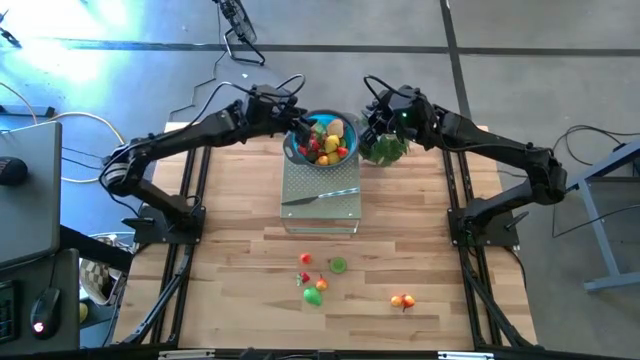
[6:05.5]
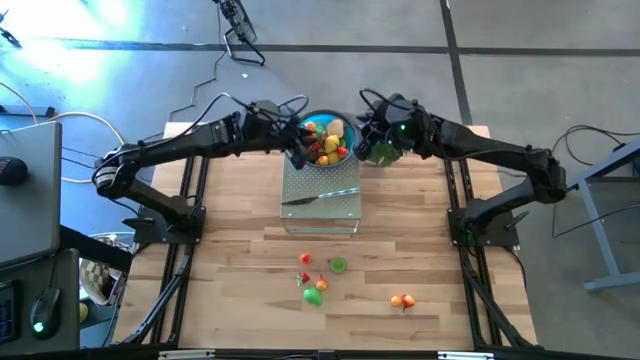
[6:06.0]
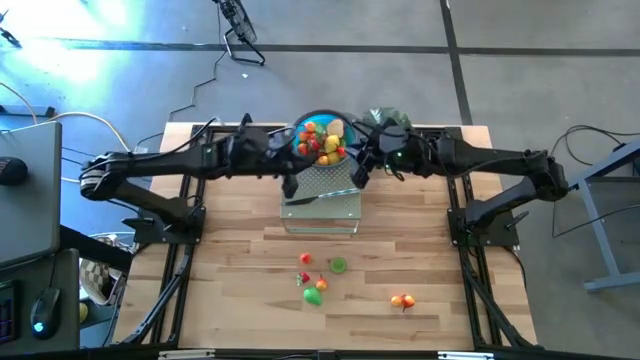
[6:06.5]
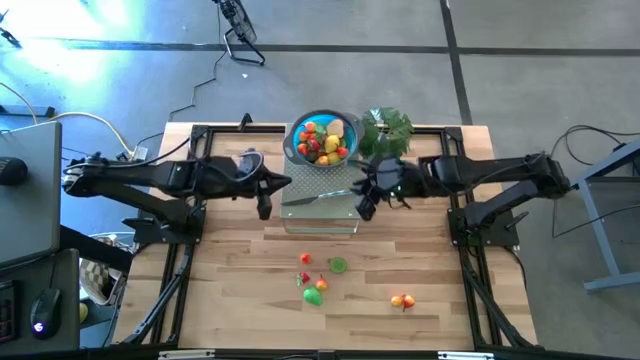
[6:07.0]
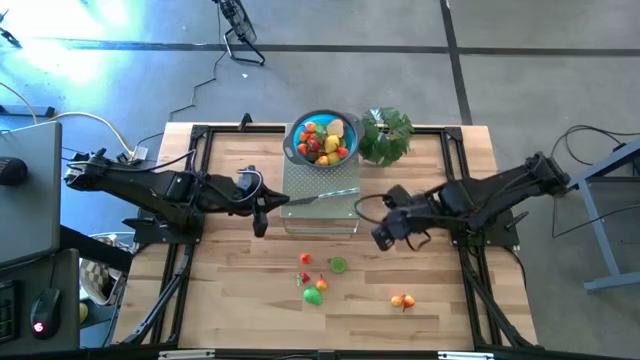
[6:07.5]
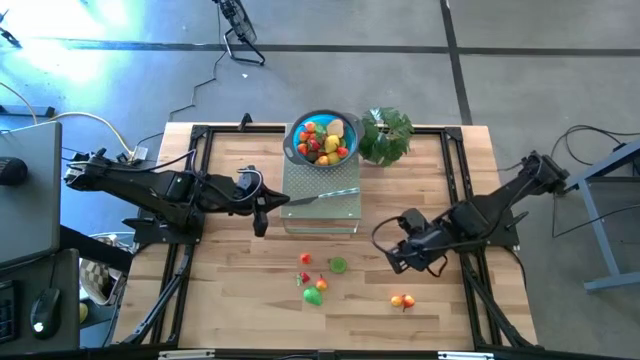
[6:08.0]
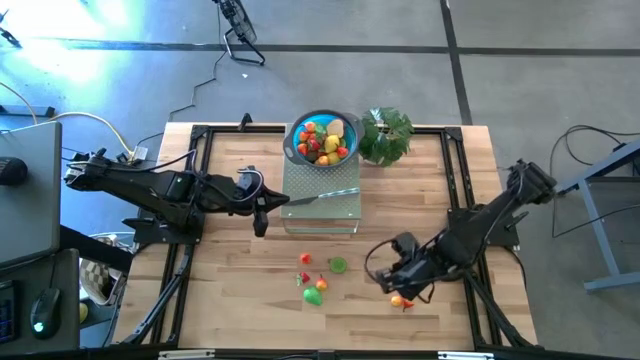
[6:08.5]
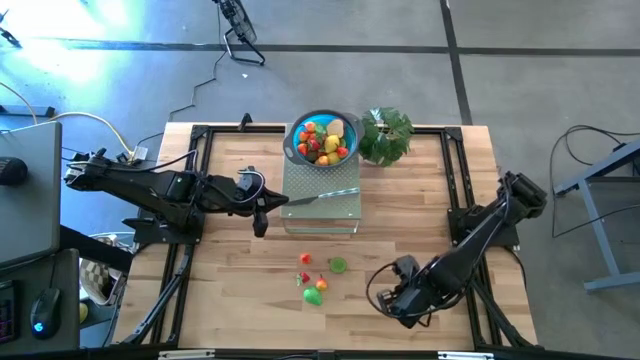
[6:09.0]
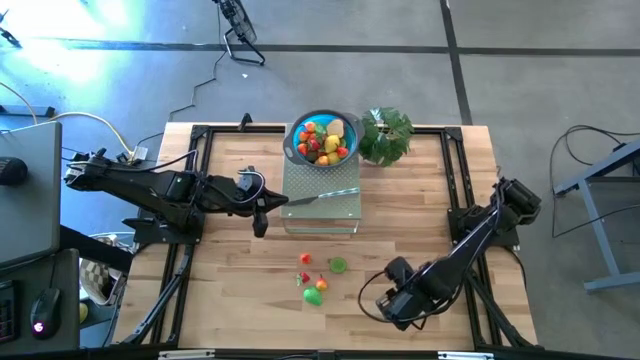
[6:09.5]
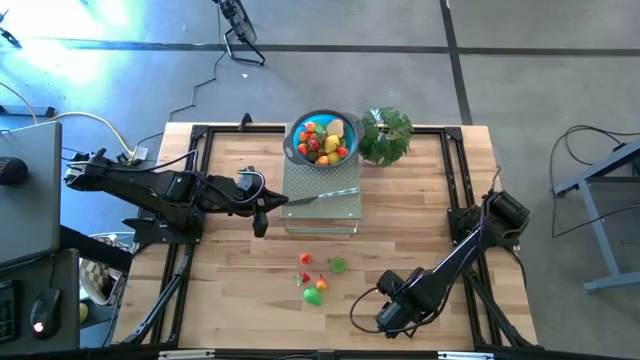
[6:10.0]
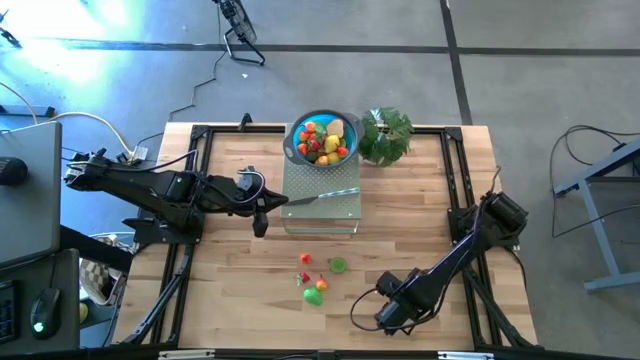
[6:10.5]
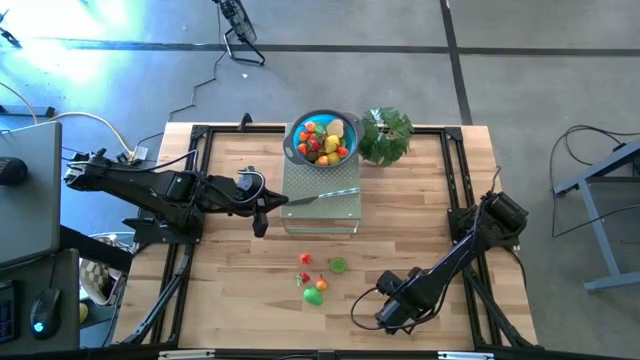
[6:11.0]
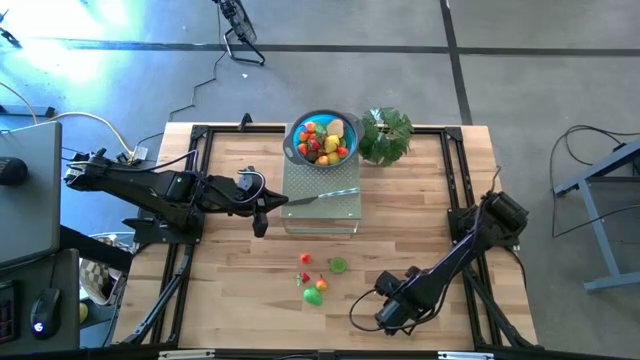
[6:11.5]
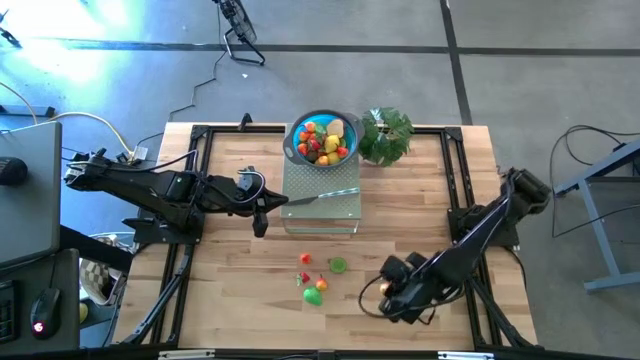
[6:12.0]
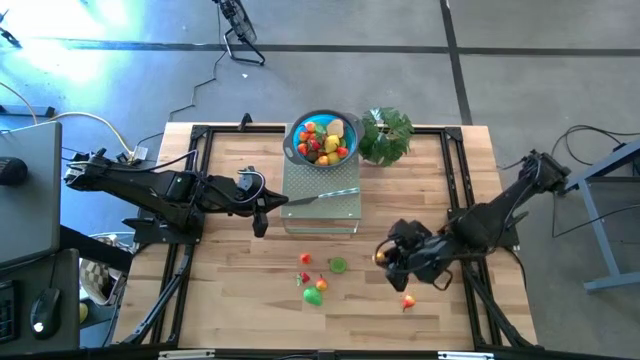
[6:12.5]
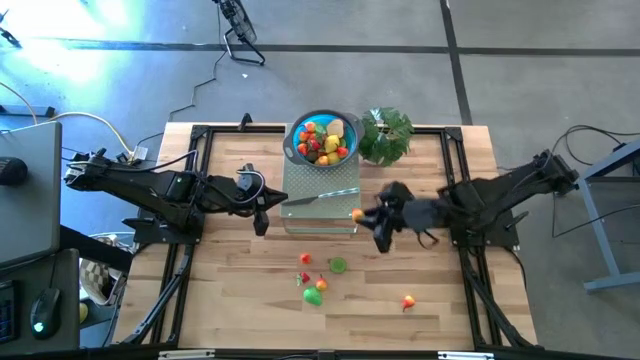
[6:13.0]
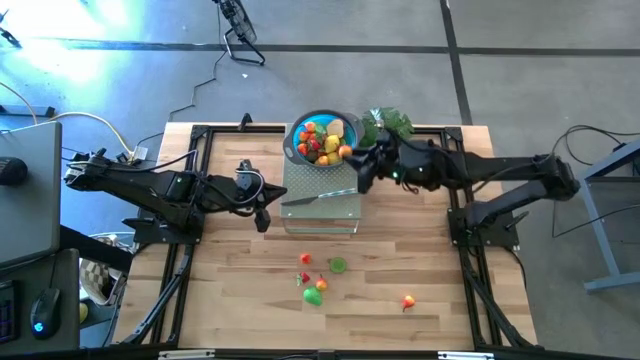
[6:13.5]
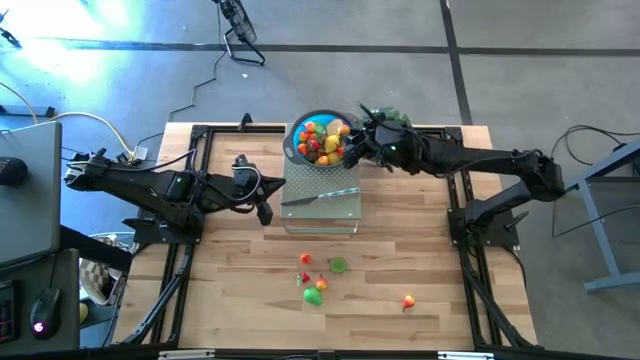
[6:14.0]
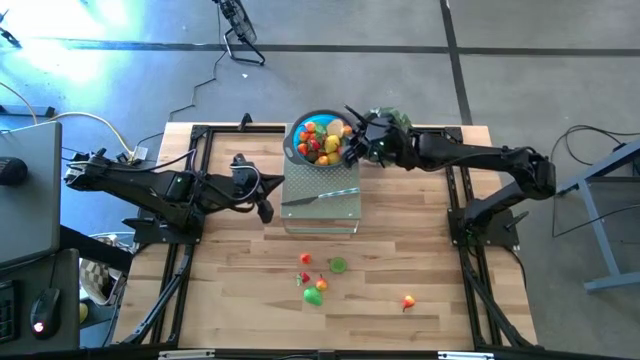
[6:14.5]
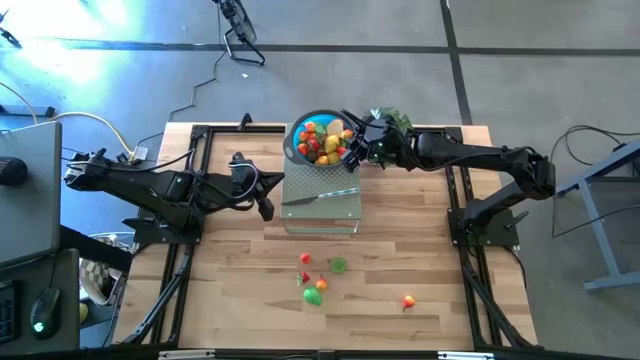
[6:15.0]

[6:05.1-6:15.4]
Task: Pick & Place Fruit
Put the orange peach in the blue bowl on the shelf

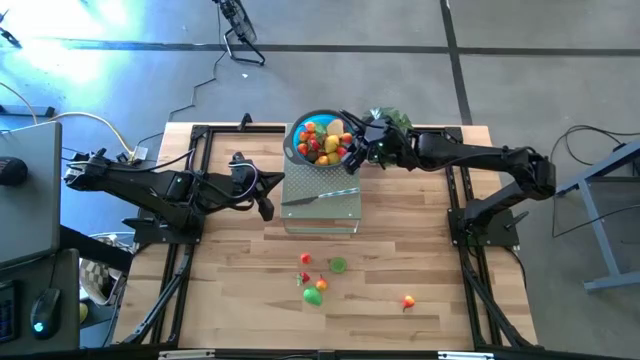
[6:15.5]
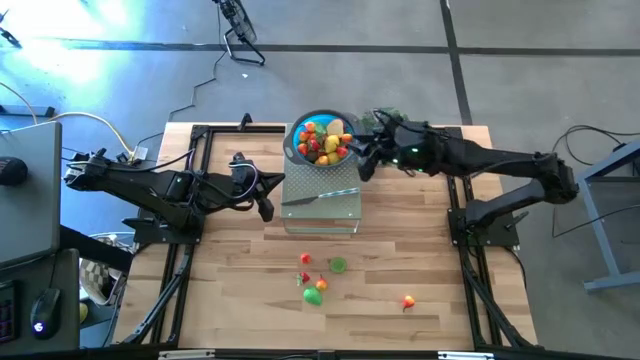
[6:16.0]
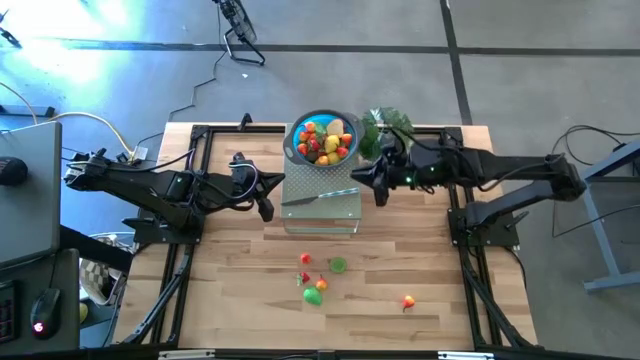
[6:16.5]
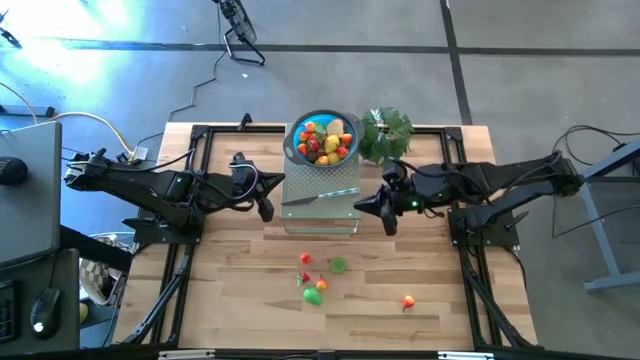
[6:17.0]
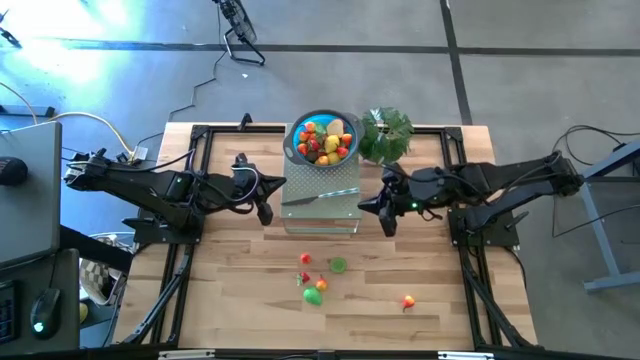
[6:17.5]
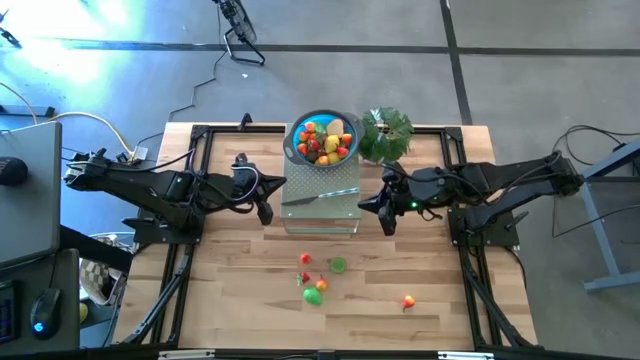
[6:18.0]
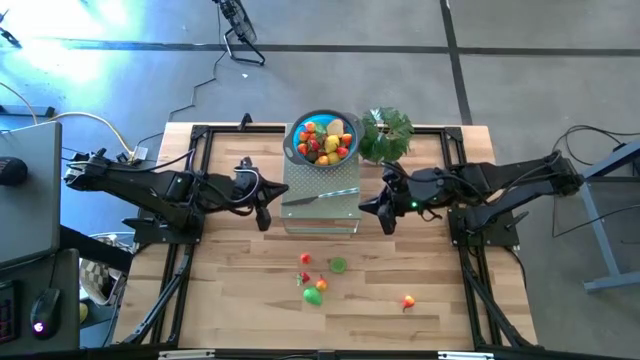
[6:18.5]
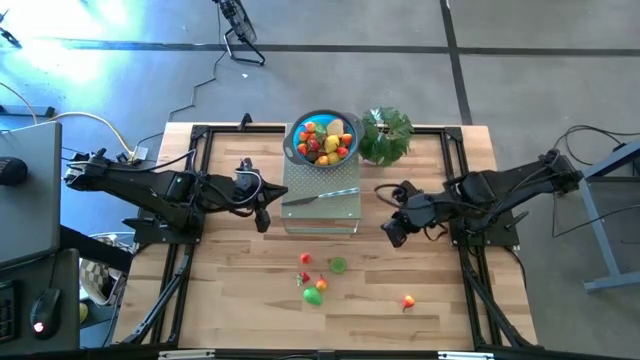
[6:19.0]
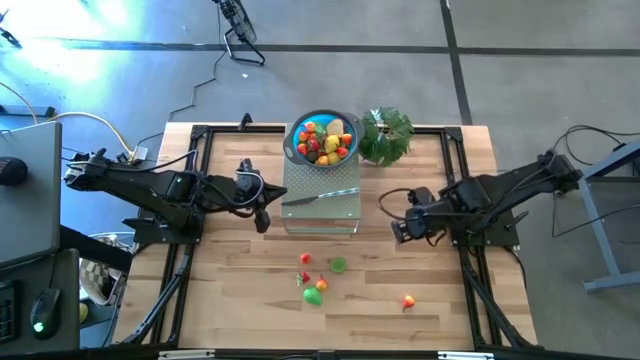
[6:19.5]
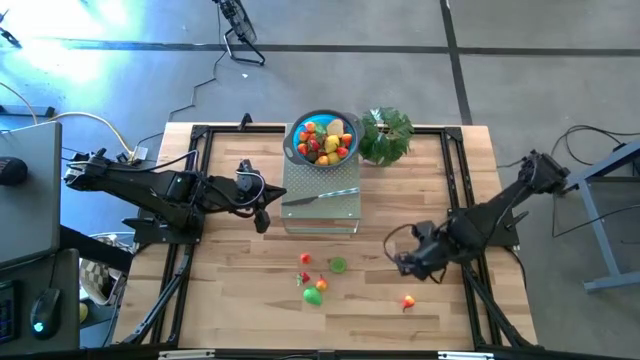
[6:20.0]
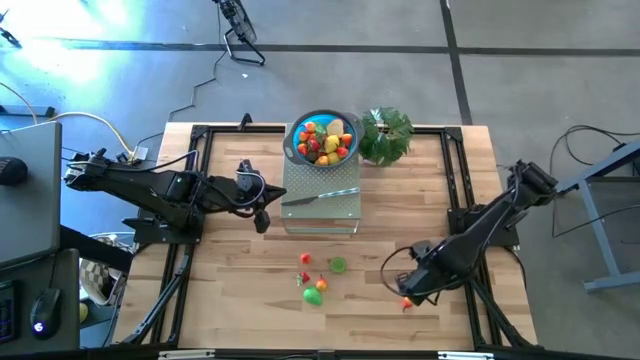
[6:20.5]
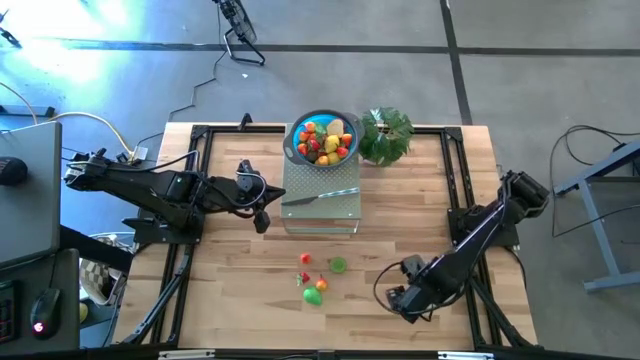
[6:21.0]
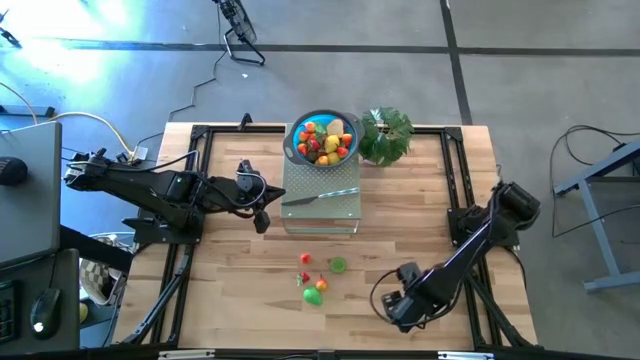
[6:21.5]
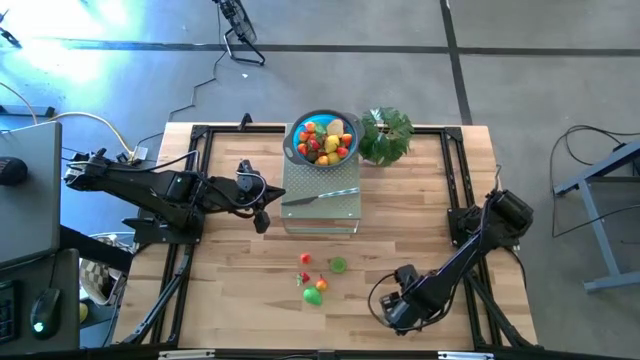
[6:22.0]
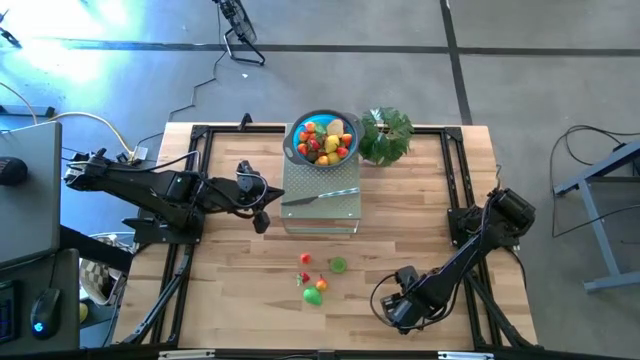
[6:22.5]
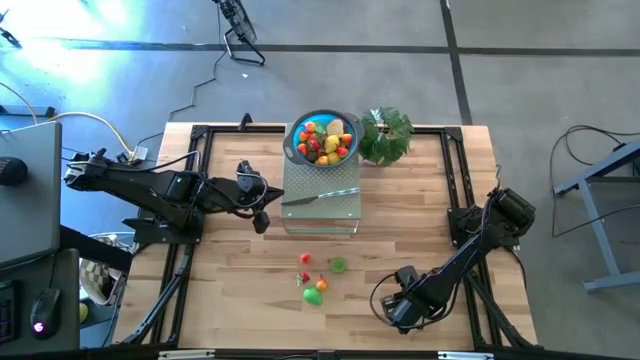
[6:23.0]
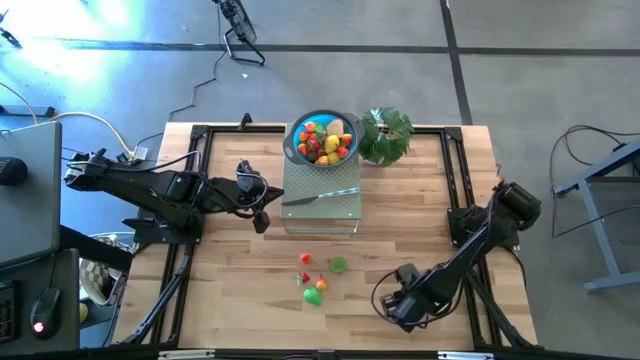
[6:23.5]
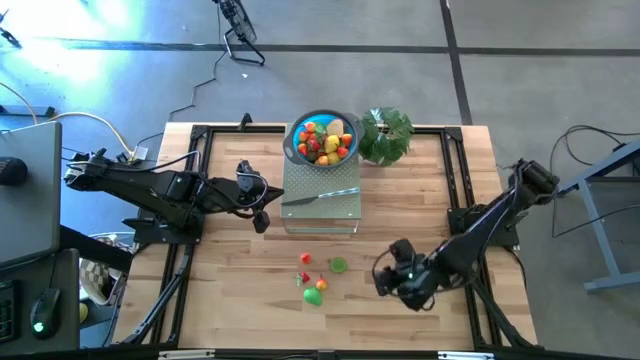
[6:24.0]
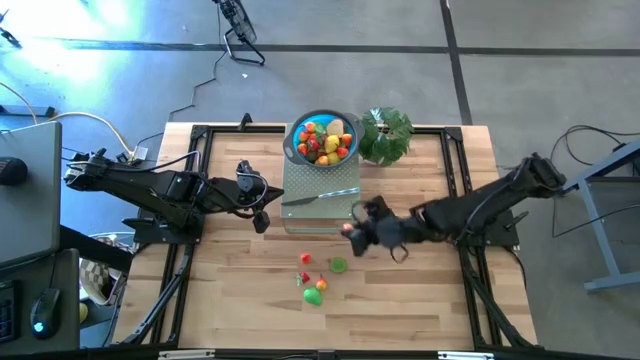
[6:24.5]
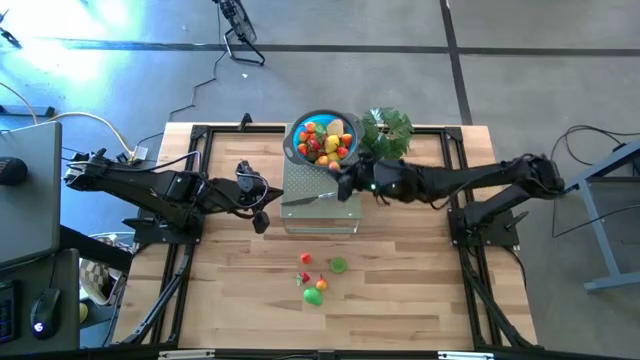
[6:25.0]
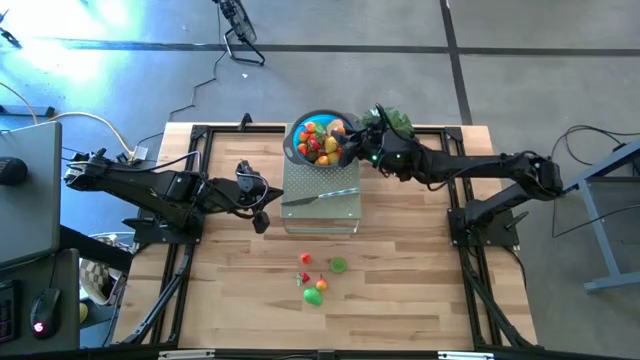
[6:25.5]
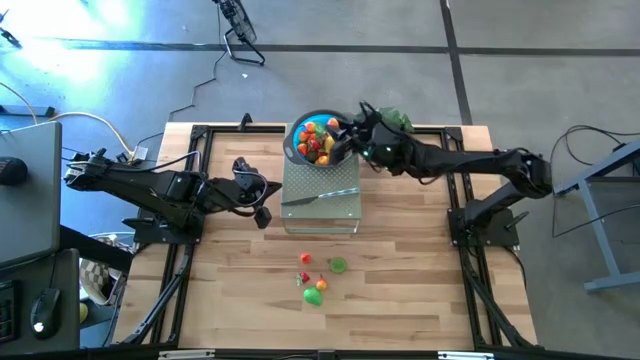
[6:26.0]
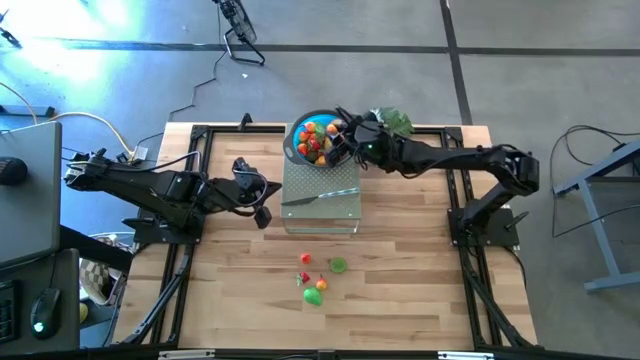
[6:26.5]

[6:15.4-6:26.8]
Put the orange peach in the blue bowl on the shelf
